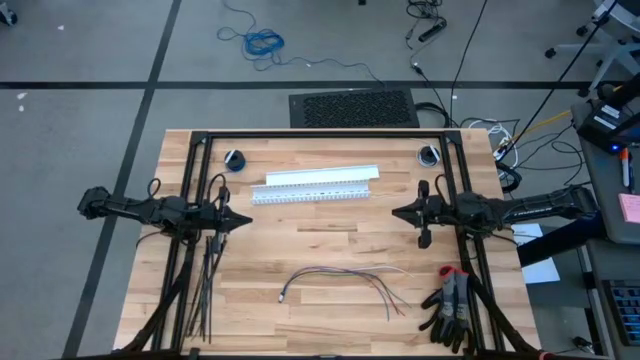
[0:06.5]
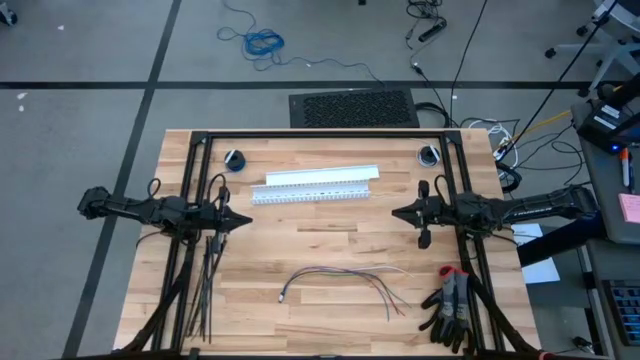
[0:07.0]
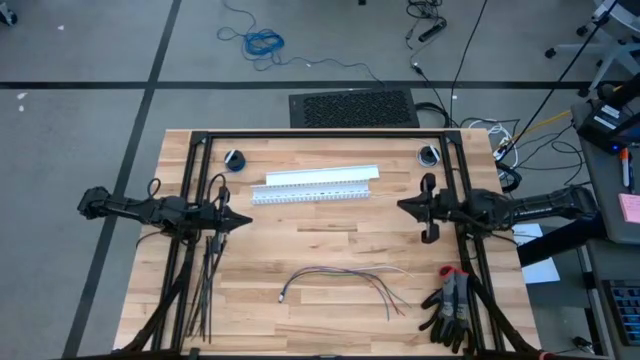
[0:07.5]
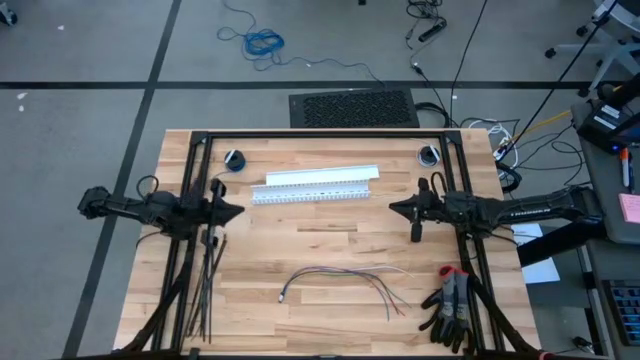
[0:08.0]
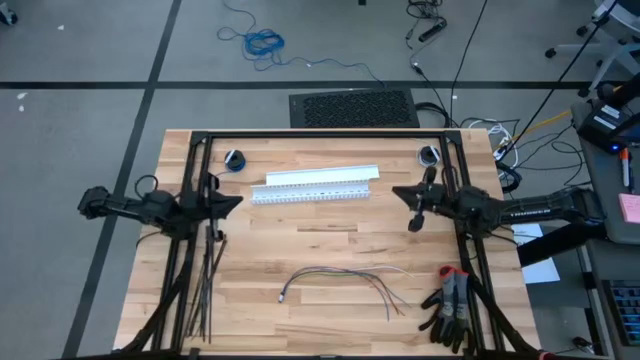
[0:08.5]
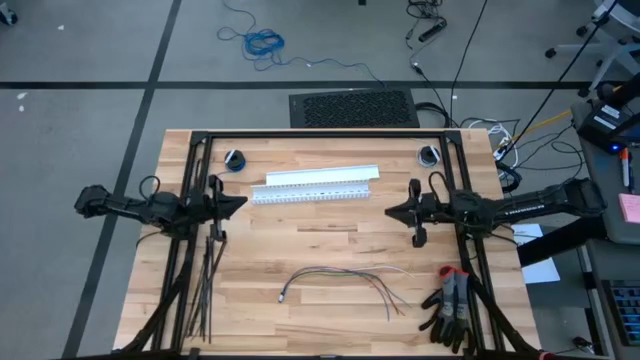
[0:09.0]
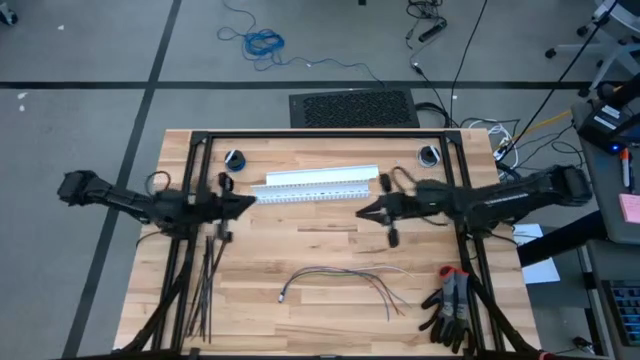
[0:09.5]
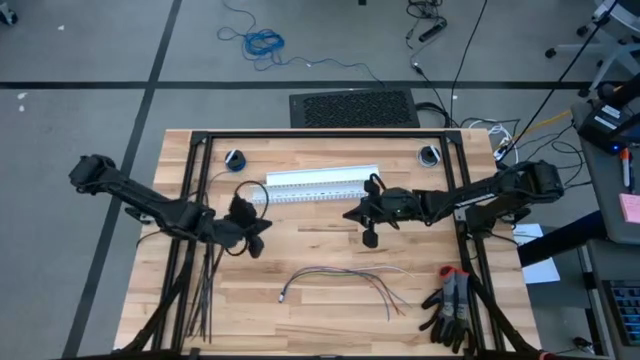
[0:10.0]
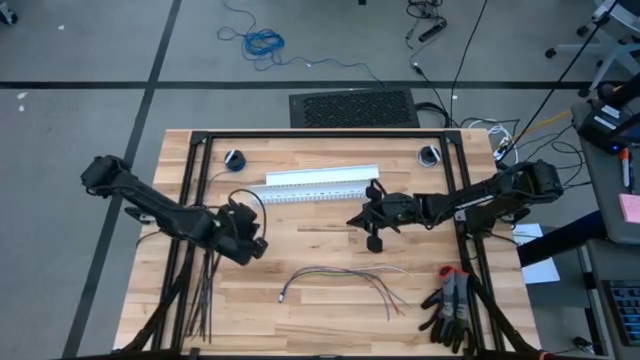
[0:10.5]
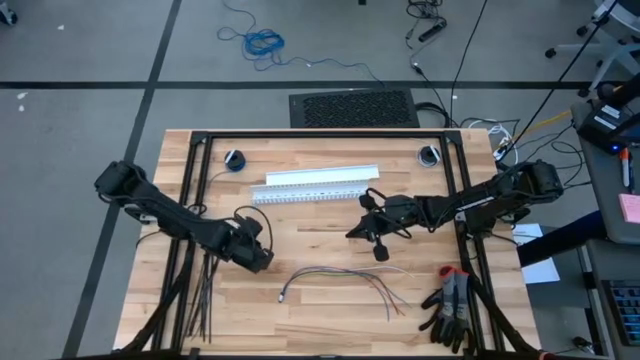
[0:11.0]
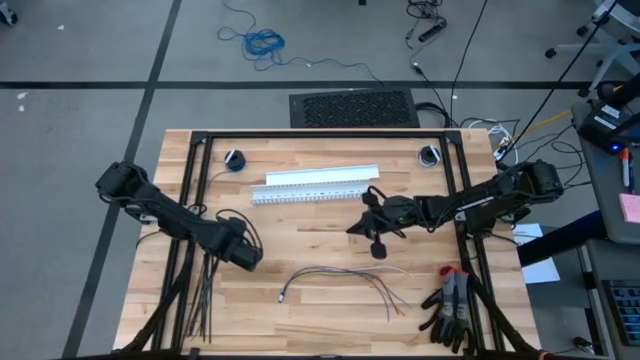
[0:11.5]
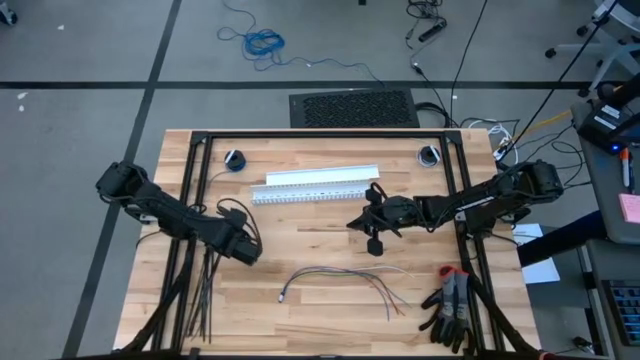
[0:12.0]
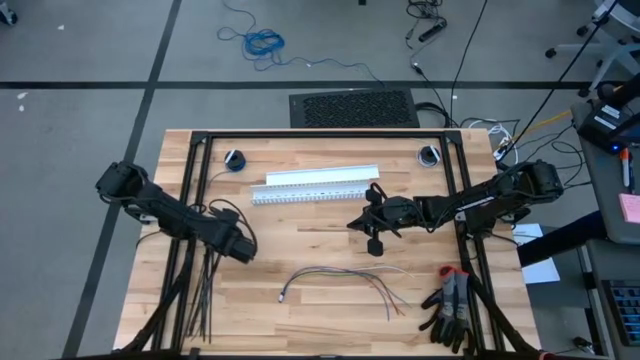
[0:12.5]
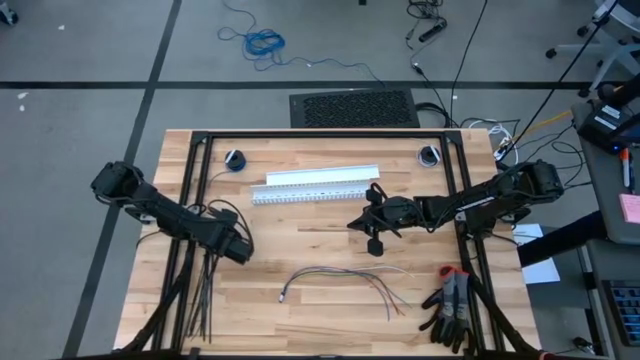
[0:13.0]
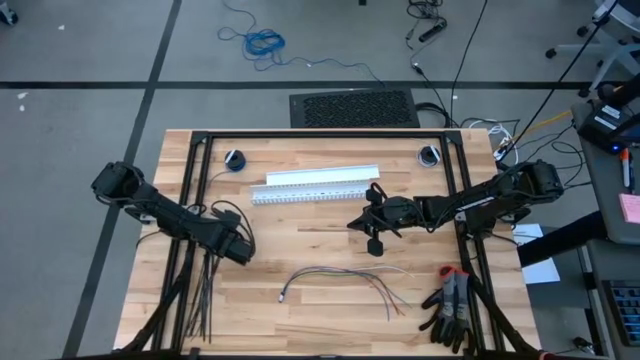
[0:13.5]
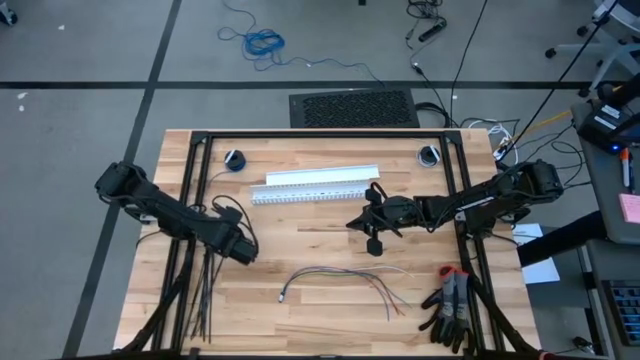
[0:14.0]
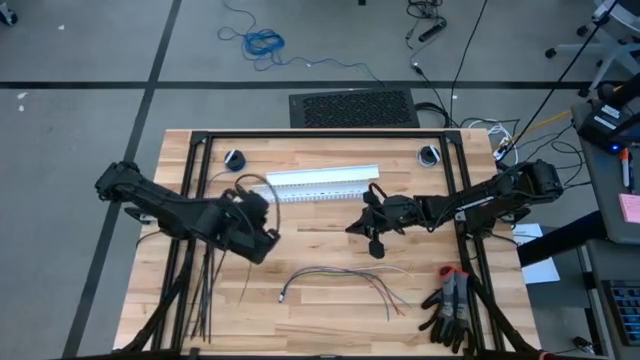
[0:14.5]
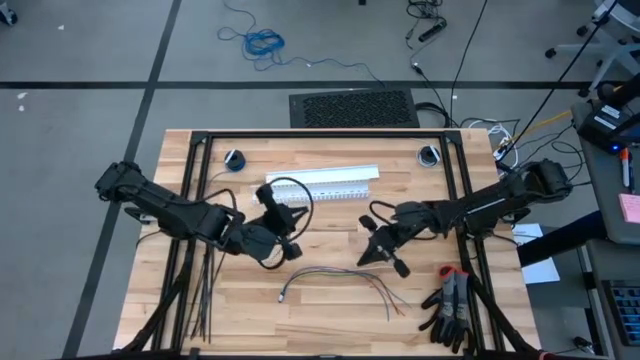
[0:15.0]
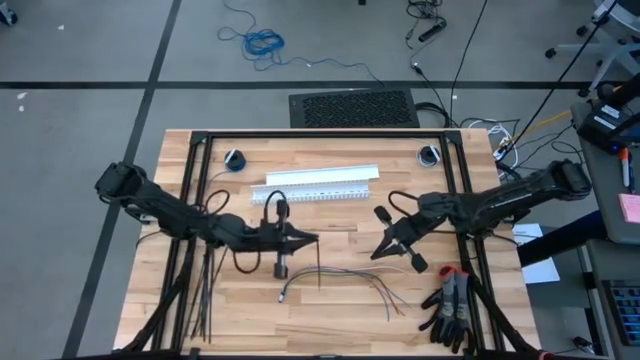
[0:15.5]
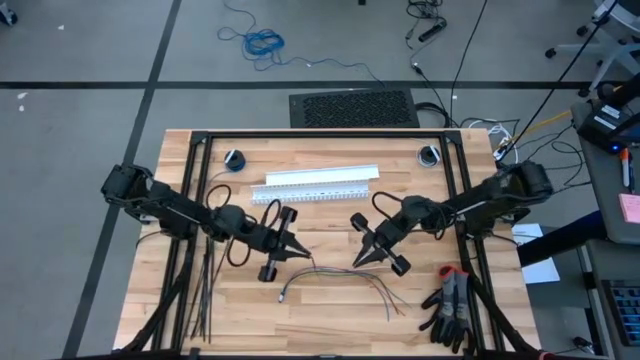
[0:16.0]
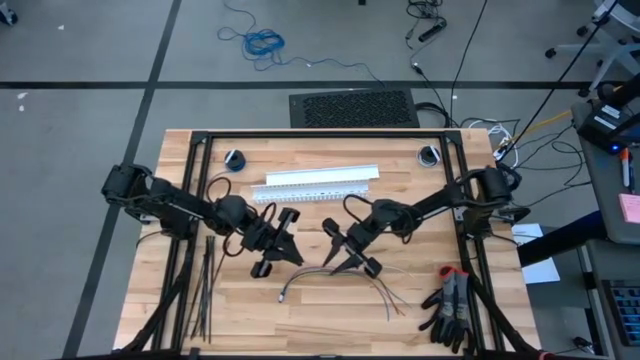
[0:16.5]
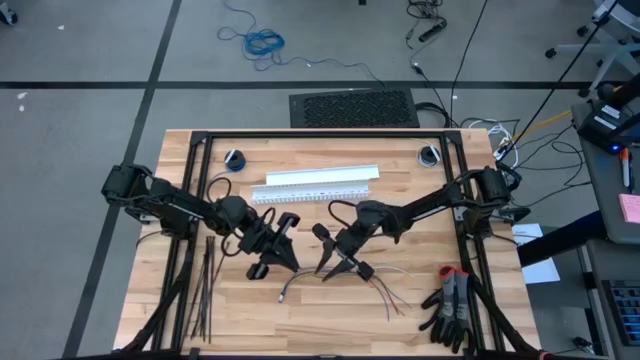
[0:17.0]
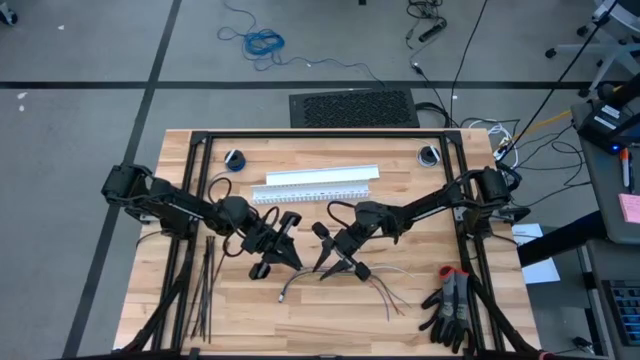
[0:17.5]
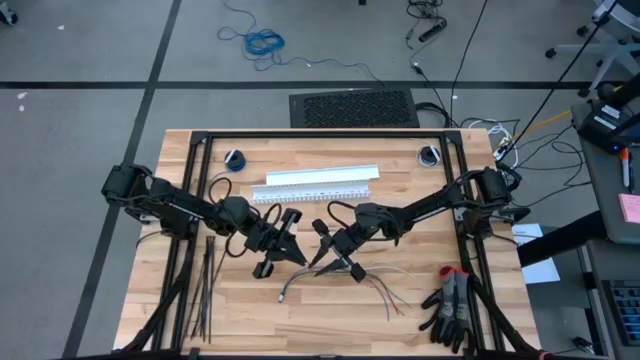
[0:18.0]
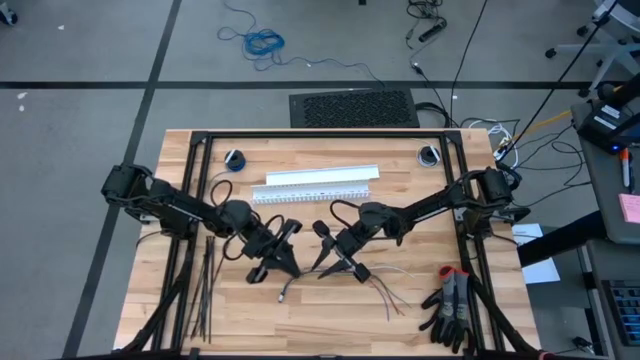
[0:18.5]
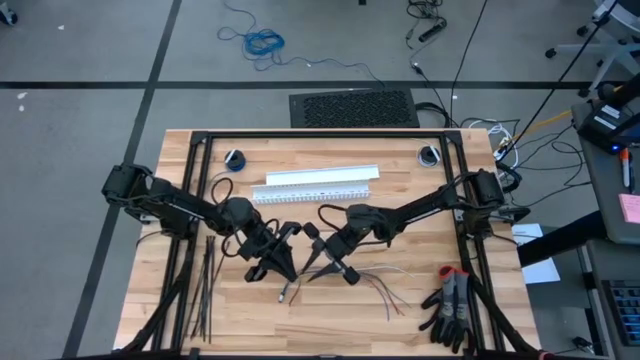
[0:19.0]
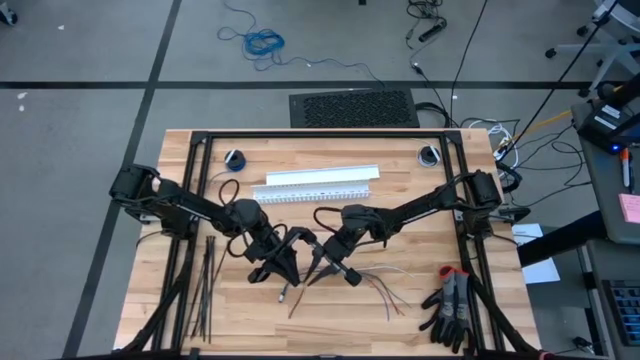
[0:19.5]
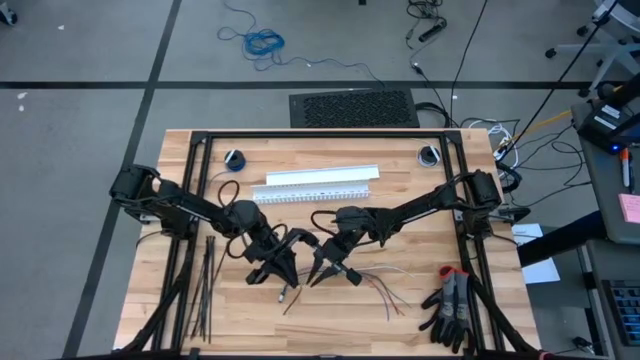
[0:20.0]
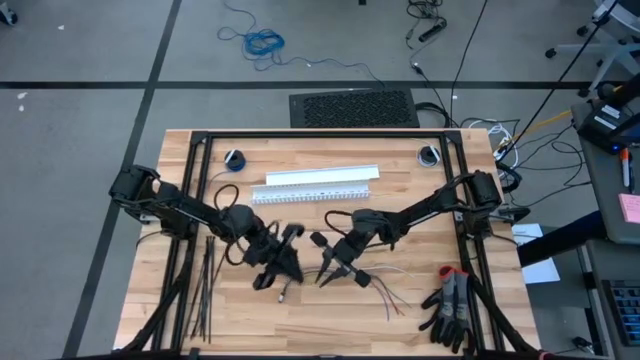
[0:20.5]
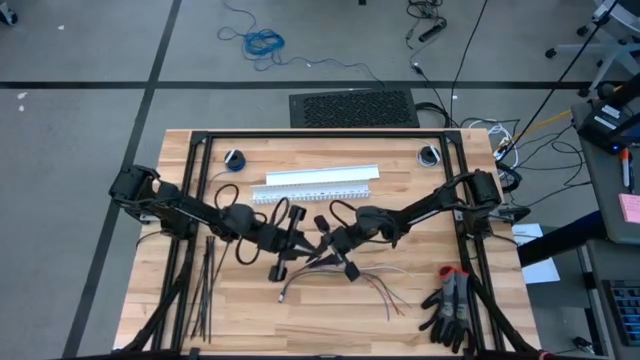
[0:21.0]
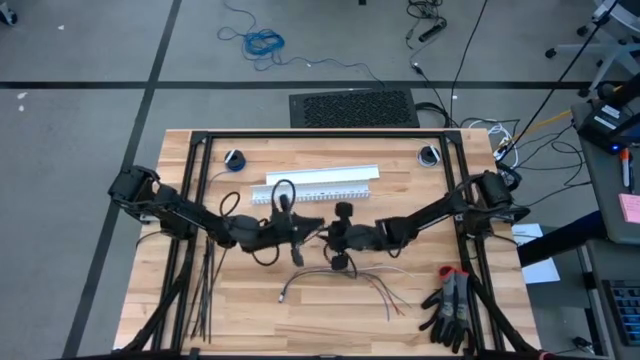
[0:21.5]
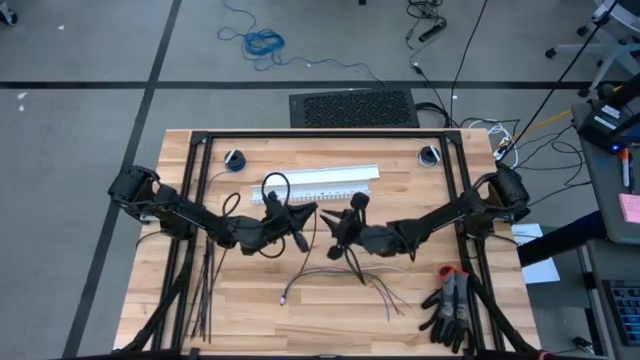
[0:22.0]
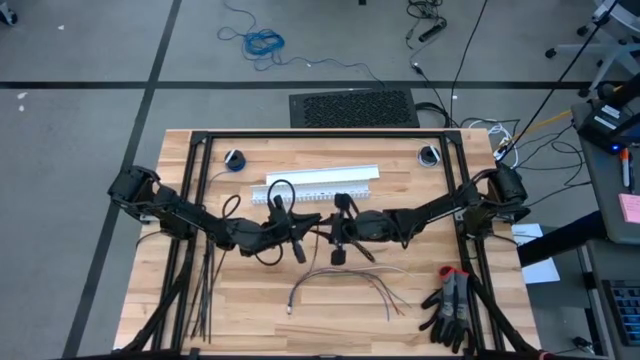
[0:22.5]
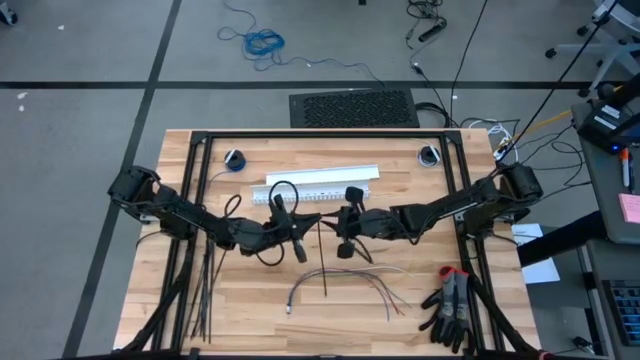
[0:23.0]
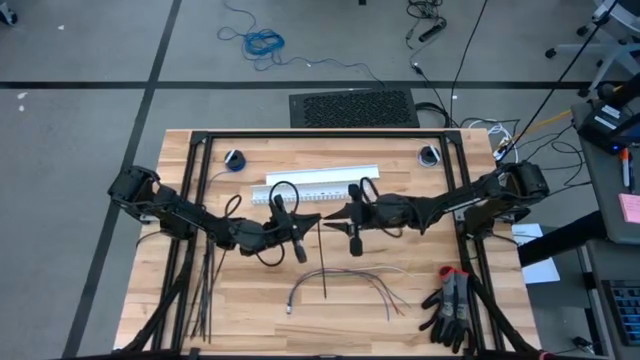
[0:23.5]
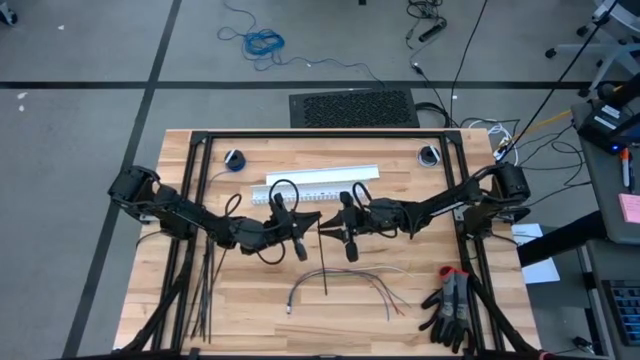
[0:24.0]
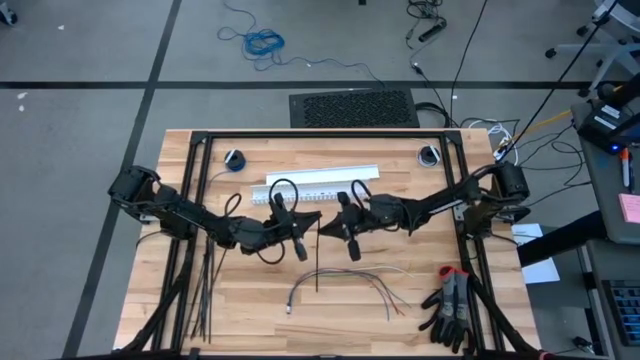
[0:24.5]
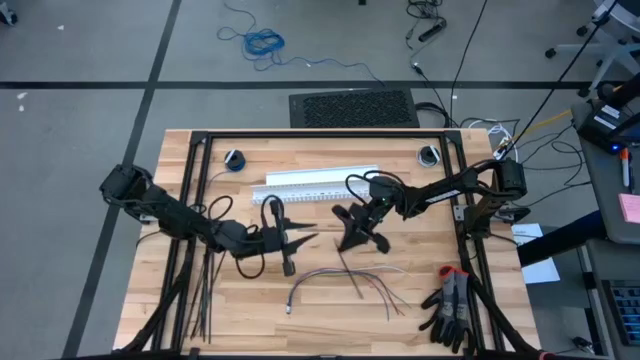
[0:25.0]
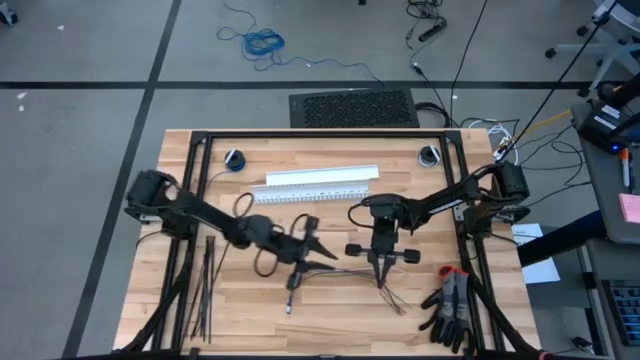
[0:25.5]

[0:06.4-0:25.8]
Task: Ziptie cables
Wrap the black zip tie on the cables
